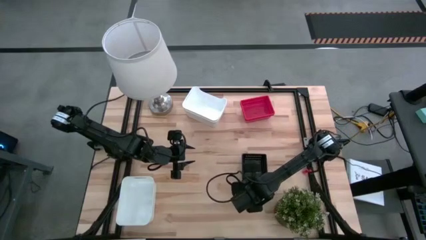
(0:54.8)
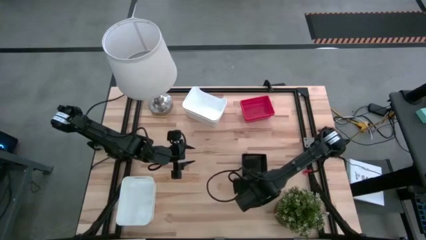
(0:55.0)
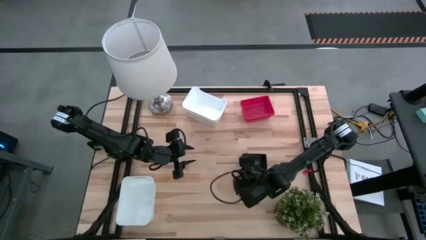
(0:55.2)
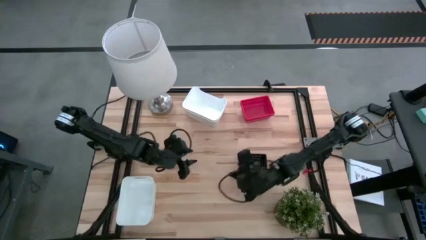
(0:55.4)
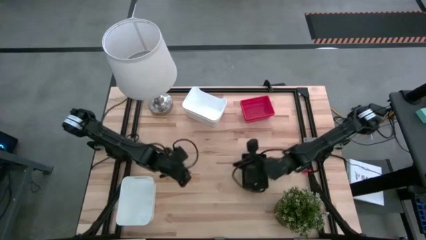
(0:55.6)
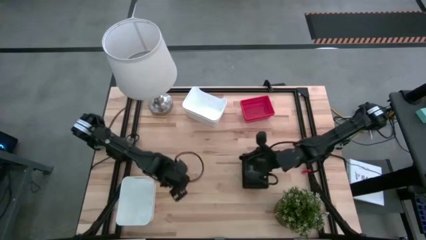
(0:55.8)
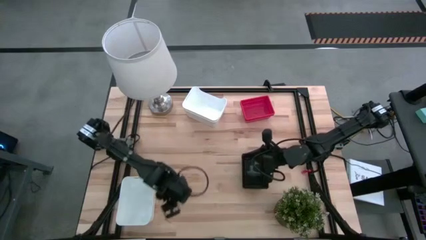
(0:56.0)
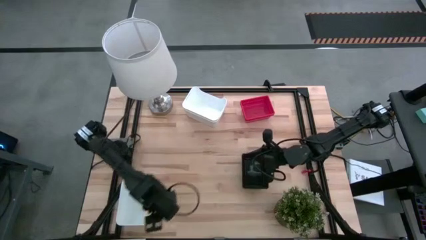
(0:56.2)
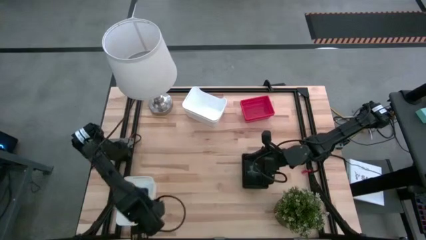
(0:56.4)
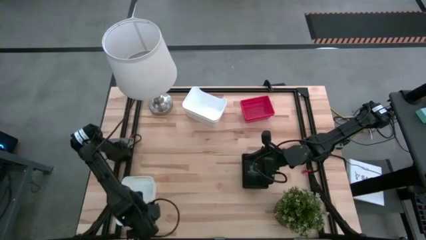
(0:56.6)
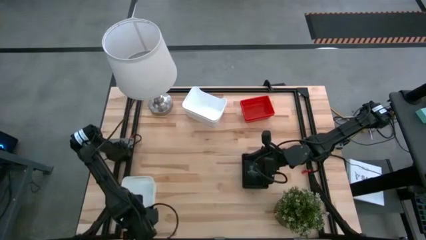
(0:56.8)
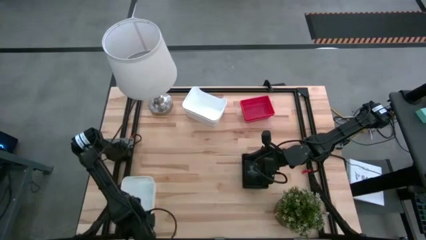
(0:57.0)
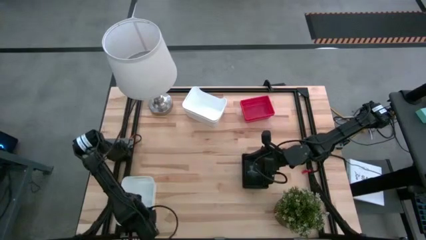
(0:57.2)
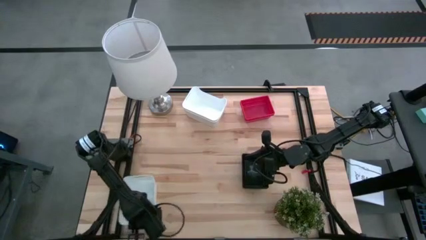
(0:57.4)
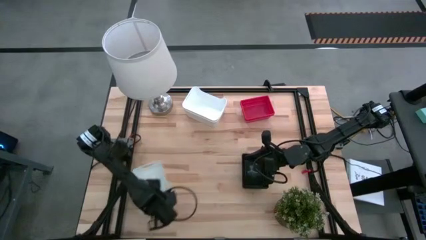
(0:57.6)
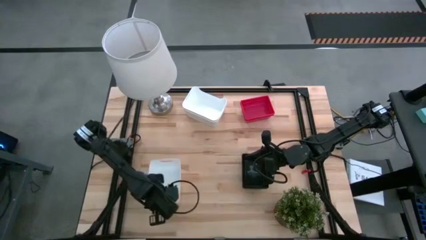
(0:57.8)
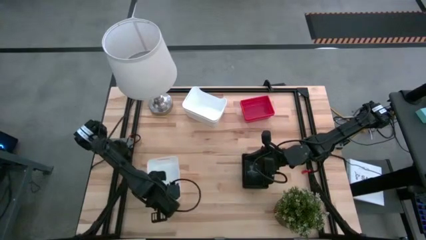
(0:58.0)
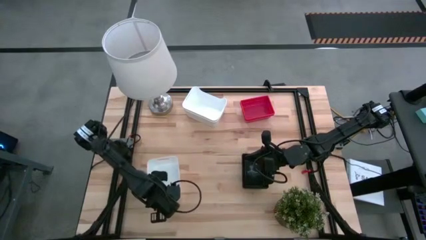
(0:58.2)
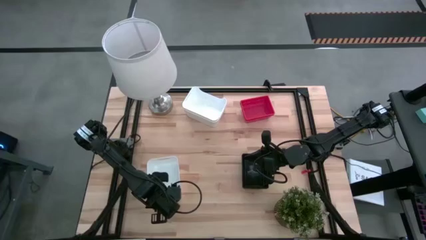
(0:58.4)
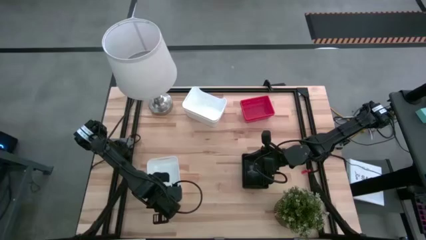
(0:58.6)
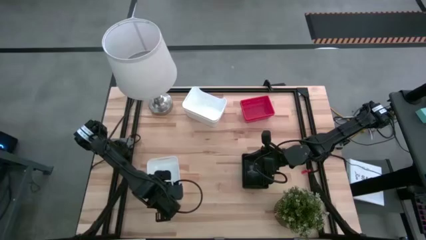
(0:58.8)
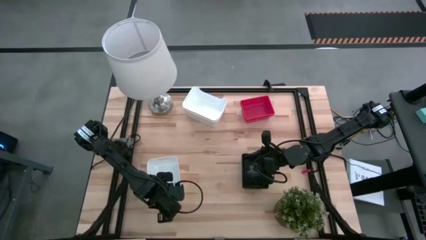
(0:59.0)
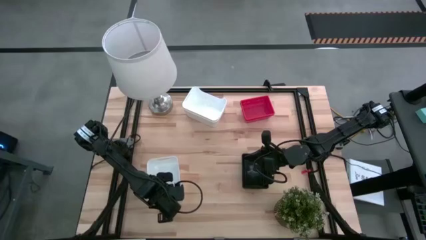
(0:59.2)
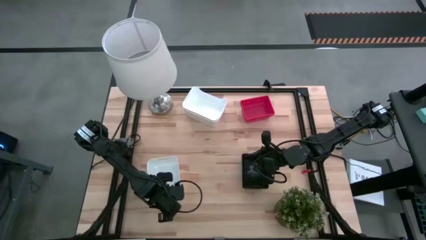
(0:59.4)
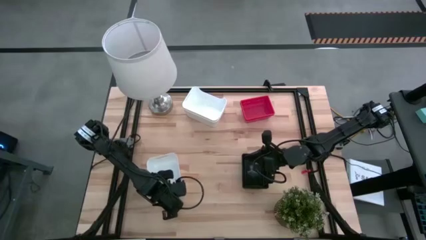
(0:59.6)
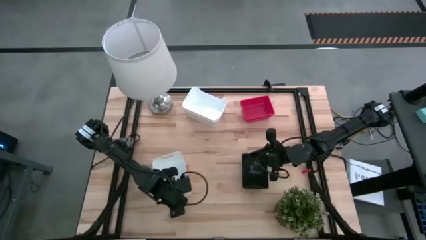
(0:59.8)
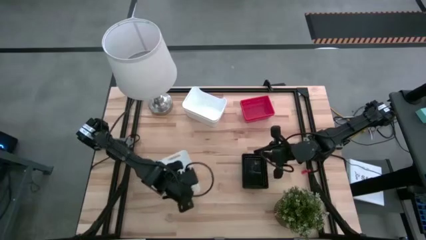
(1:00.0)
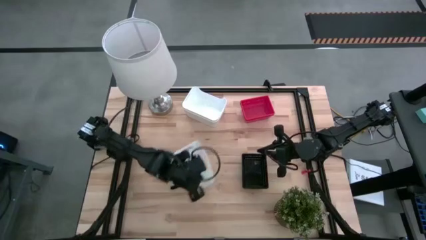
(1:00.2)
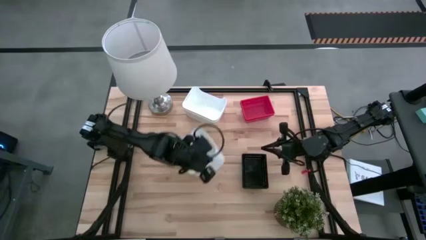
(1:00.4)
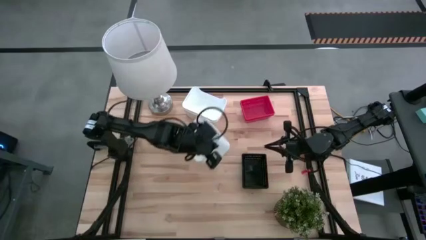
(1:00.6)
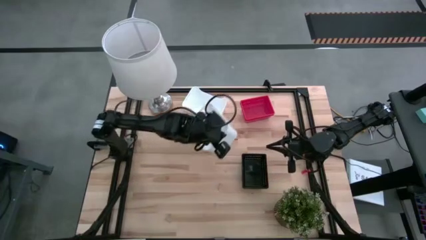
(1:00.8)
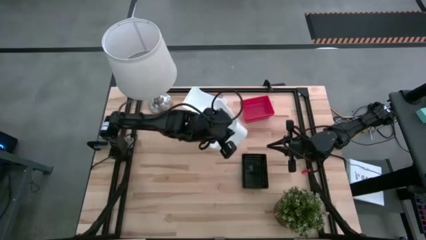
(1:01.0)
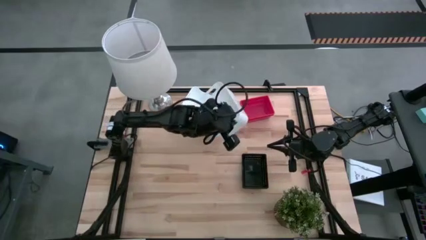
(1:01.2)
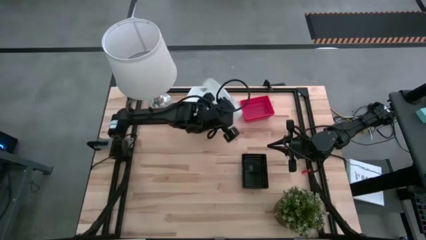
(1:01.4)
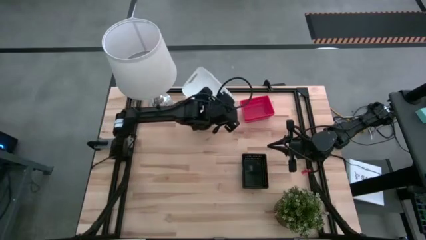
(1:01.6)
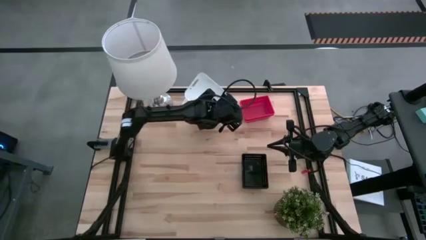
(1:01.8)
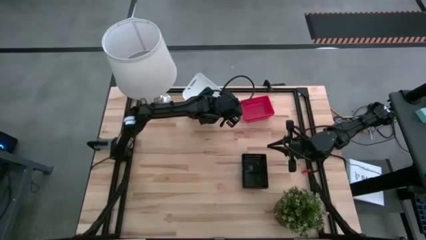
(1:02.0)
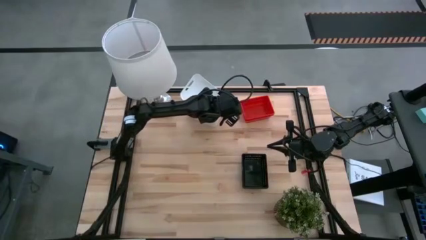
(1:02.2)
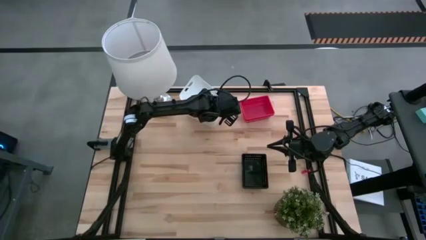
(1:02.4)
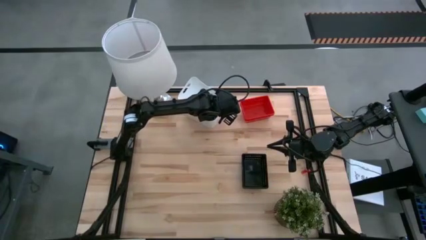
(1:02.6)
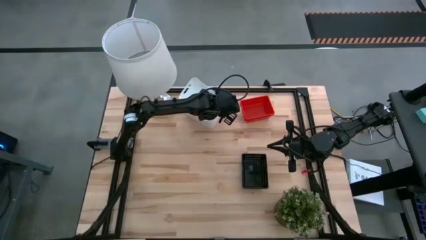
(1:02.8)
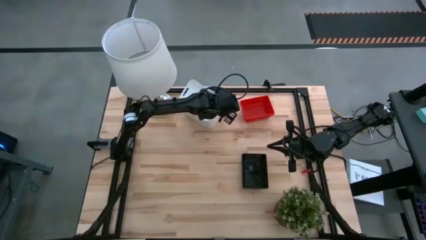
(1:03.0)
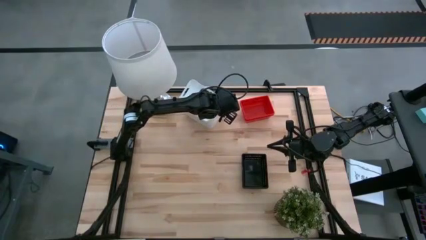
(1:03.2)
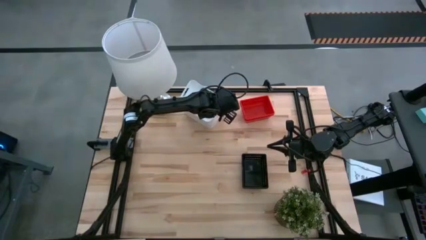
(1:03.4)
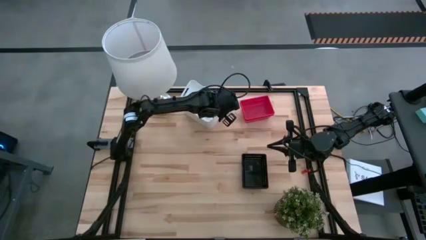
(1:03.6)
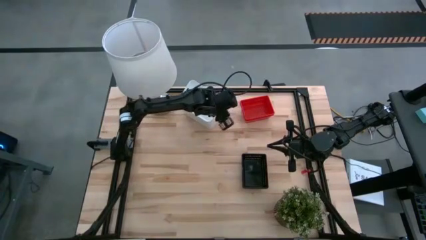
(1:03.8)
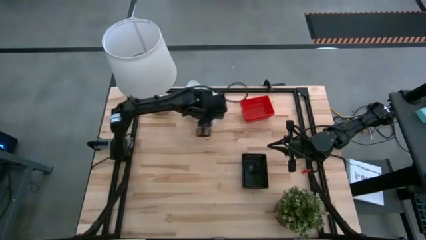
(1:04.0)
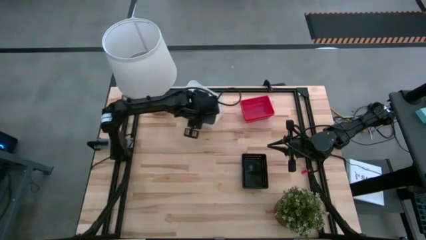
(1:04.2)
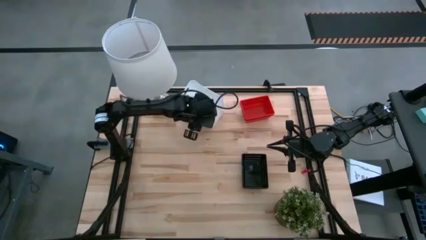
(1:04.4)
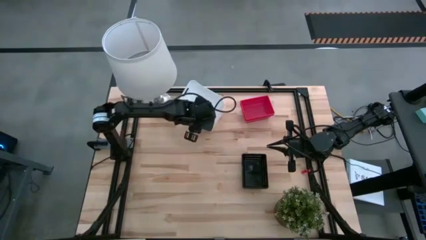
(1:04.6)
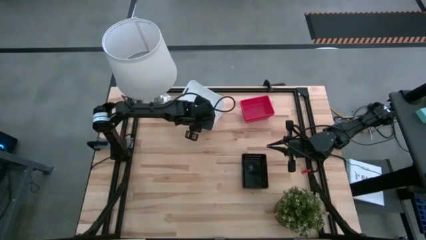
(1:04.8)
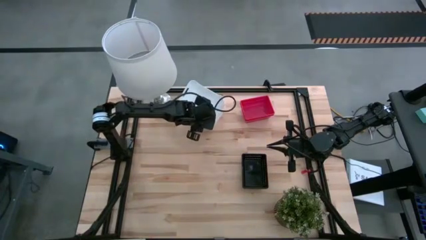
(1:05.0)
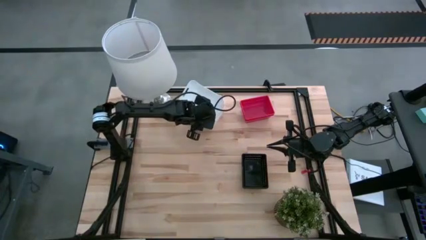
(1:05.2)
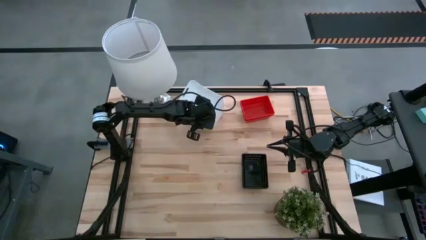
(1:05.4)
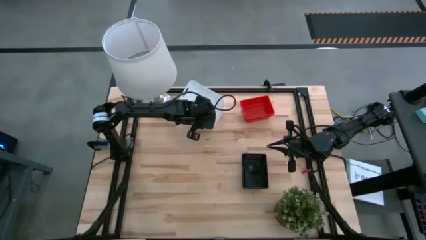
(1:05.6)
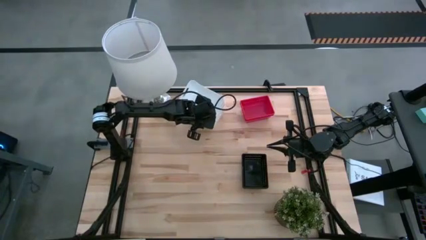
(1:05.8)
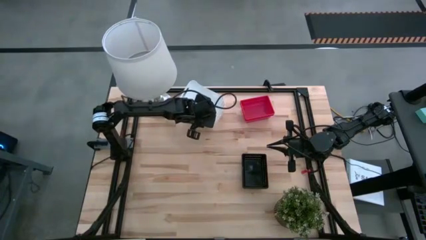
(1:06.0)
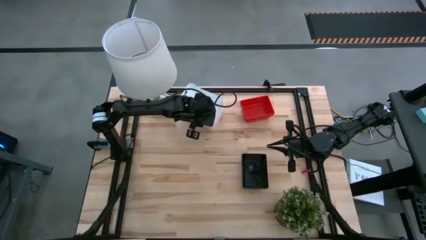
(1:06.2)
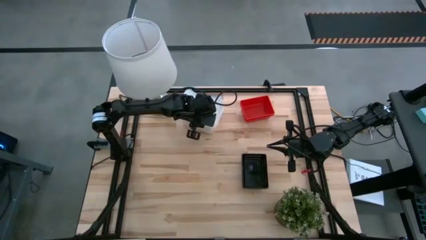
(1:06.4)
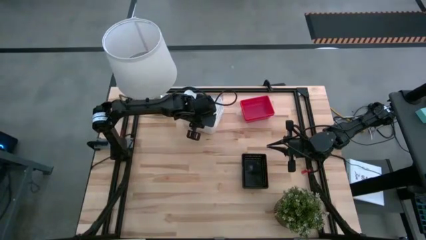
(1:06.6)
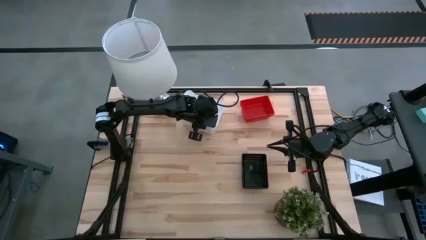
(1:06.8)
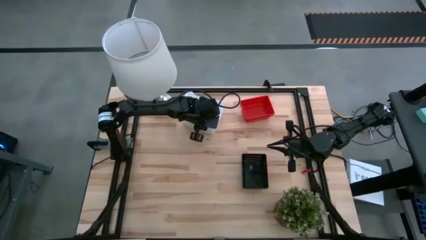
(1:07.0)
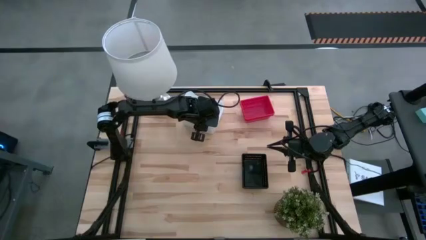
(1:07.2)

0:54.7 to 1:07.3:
Stack the bottom white bin on top of the top white bin

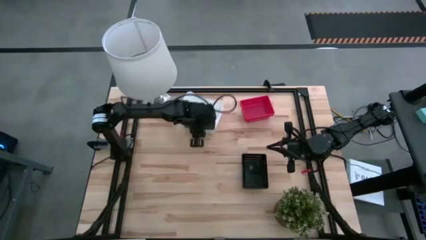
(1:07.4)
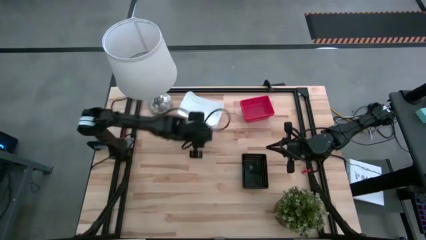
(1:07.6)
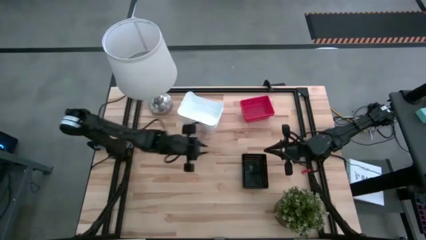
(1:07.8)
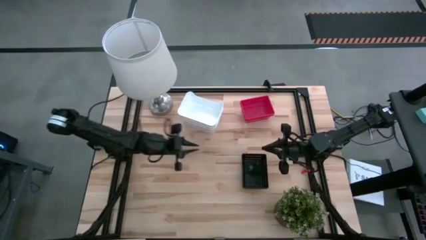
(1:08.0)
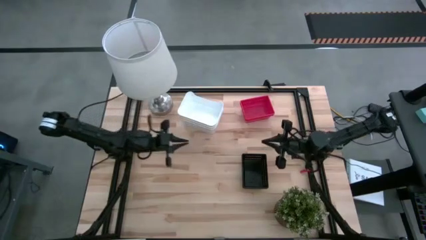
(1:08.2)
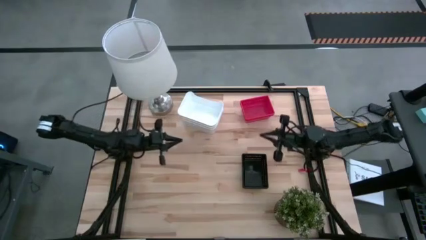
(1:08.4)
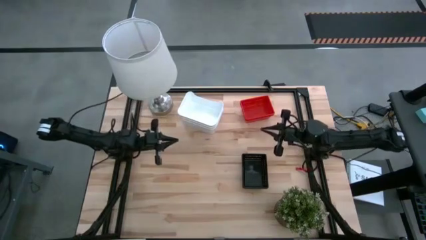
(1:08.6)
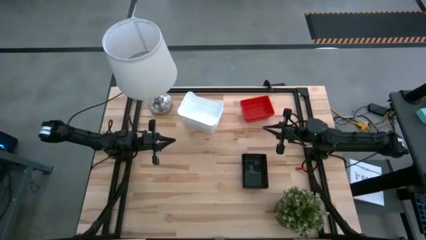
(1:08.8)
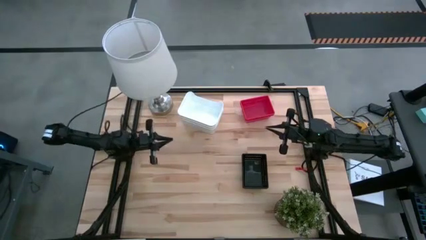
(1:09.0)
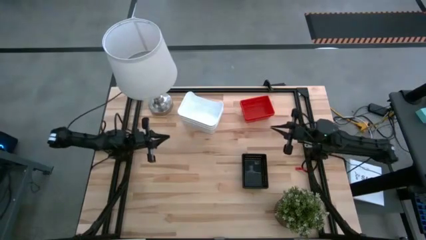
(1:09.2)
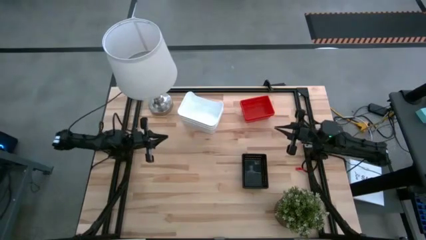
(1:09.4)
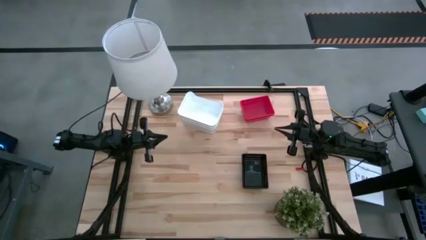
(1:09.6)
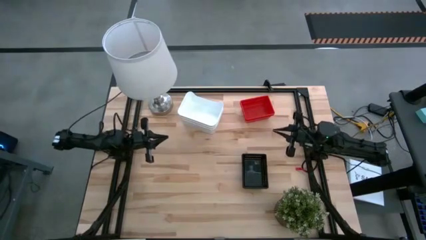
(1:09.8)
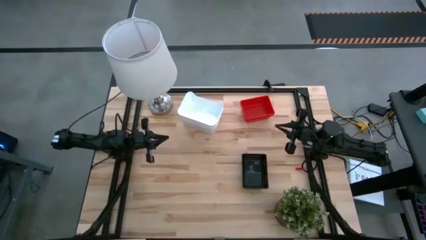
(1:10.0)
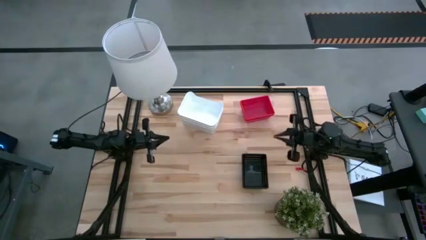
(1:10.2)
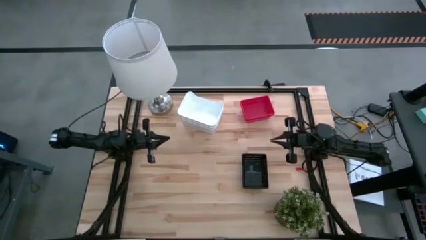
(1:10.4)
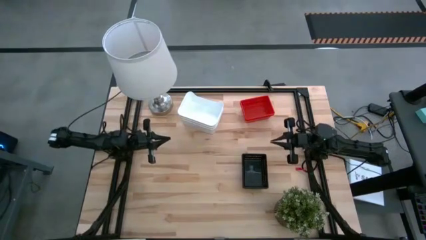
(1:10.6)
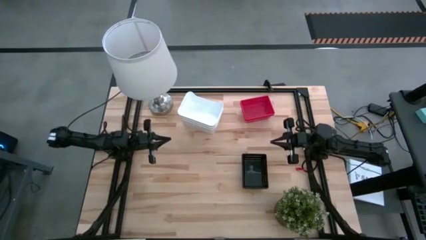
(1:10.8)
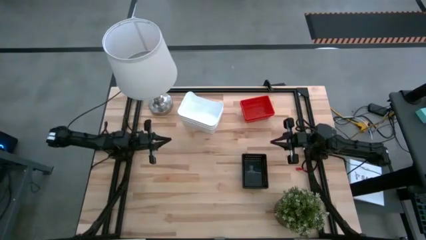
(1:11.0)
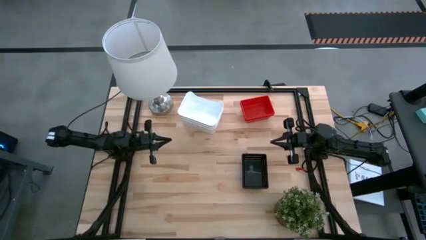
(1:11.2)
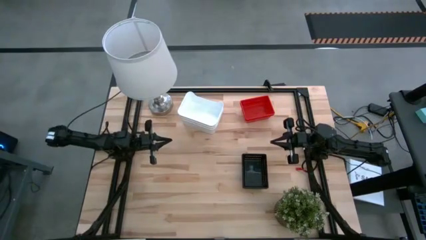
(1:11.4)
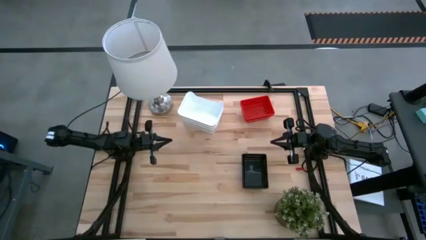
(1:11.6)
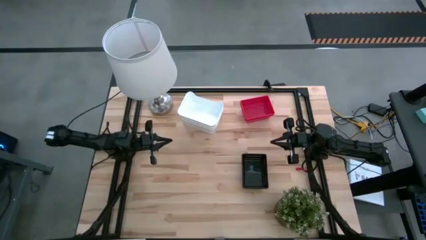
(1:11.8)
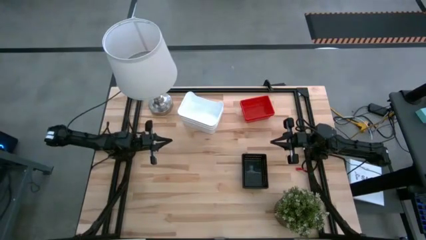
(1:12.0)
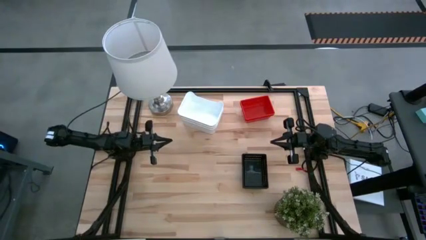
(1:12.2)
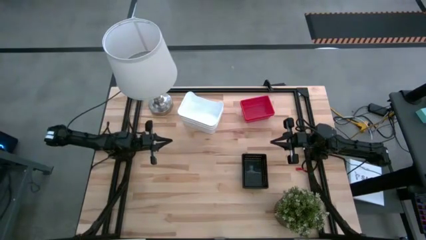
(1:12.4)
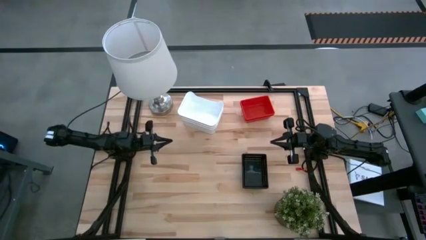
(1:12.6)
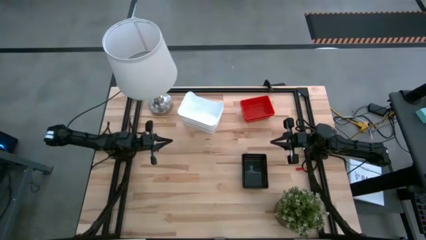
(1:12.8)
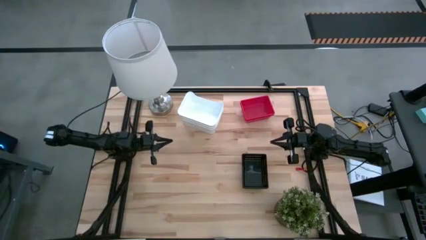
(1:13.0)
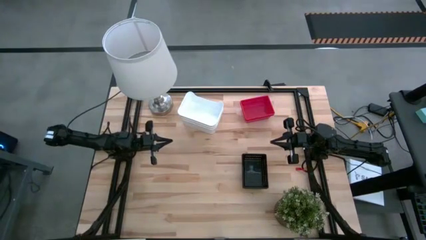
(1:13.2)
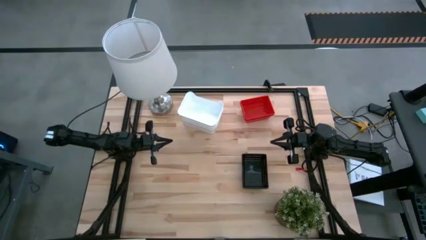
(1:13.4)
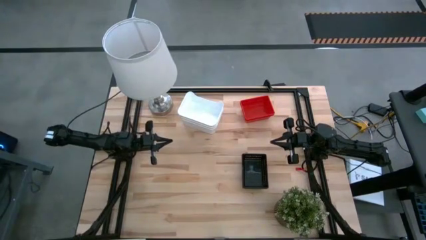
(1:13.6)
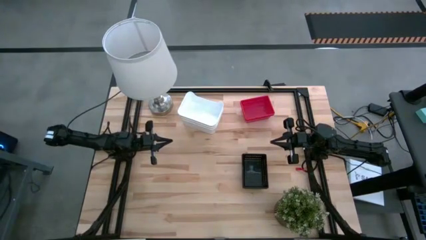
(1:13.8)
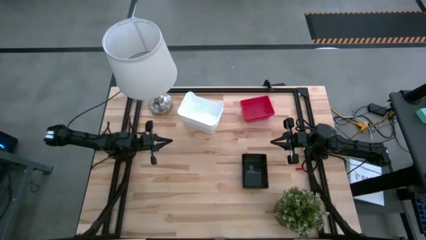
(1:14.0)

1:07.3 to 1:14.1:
Return to Home Position
